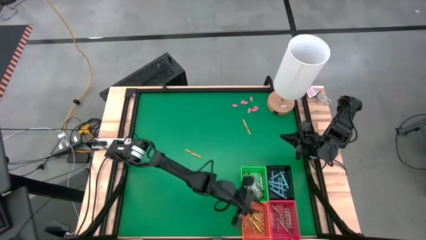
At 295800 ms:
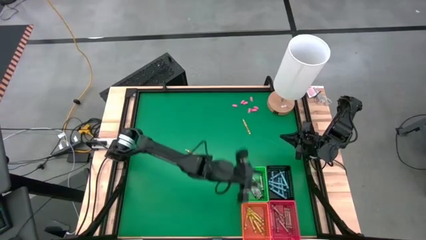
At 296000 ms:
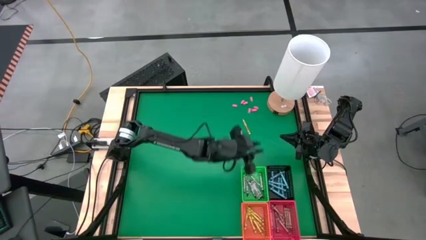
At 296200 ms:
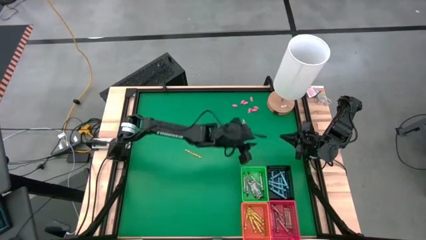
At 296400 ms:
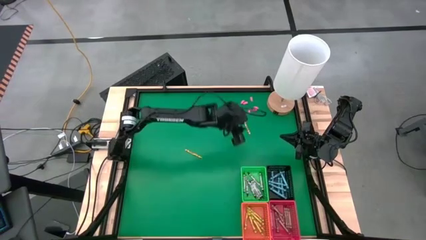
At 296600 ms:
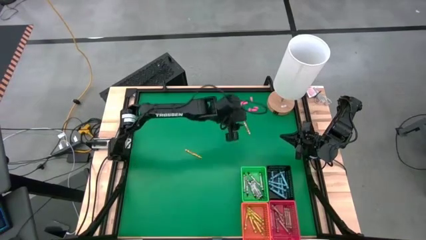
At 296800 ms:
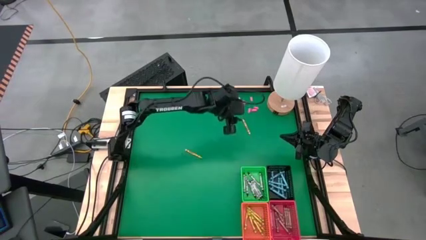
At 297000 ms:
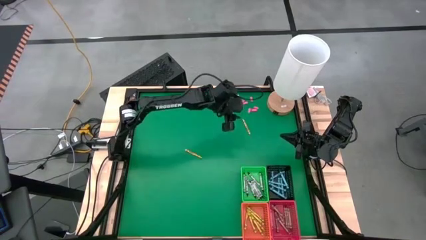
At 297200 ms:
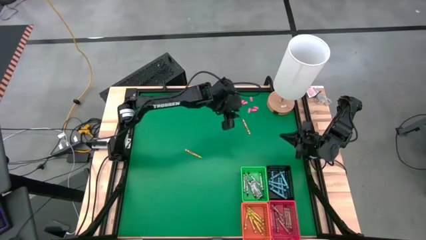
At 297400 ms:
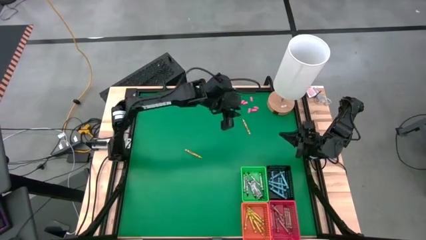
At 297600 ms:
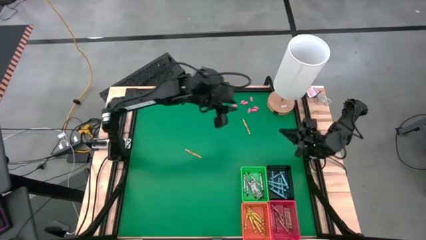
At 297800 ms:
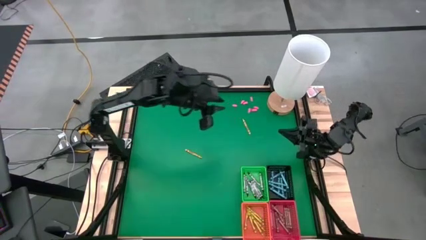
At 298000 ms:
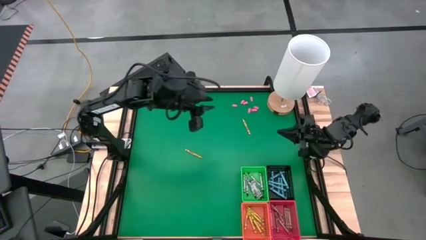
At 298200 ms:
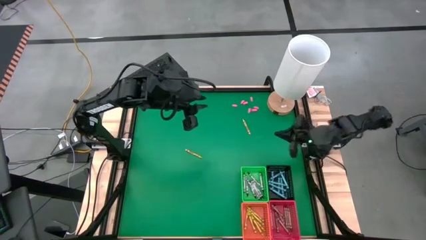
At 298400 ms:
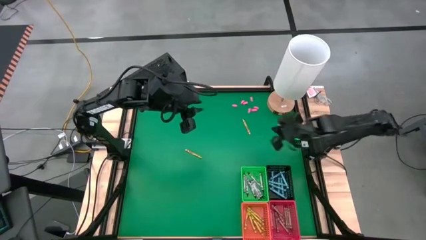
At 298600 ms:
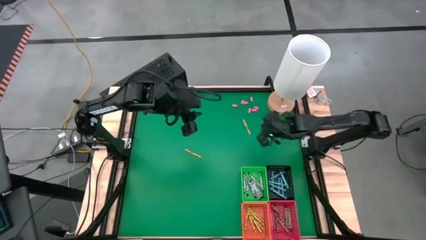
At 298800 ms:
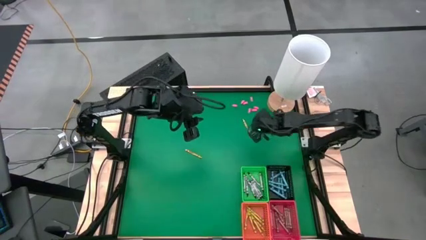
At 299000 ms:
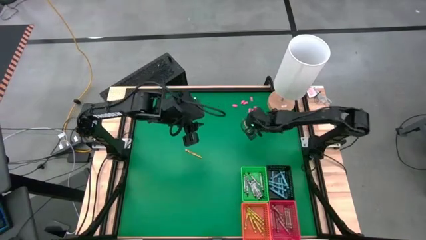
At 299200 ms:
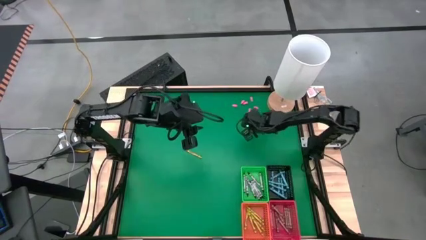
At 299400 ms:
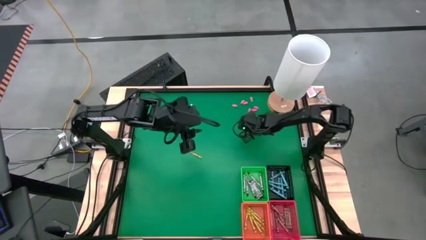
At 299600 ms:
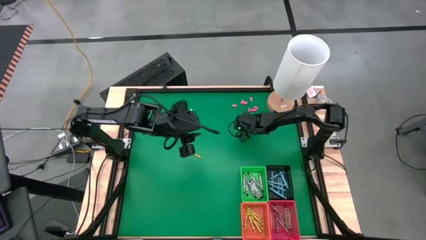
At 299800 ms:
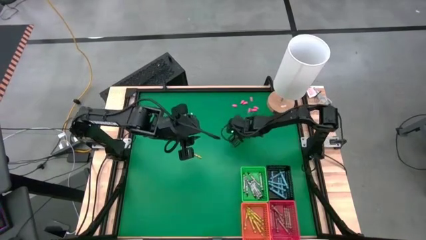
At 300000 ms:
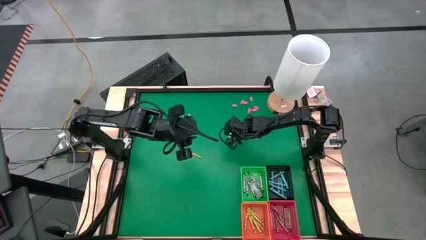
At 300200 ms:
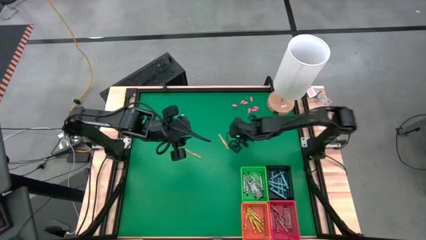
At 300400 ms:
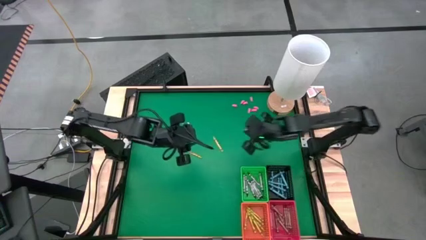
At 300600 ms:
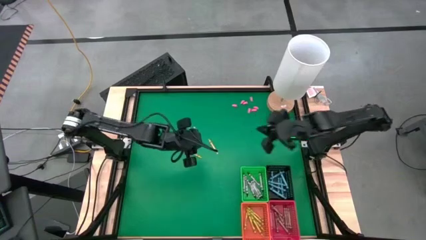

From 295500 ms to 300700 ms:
Task: Sort crayons
Put the light green crayon into the orange bin

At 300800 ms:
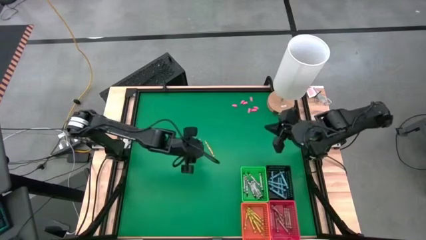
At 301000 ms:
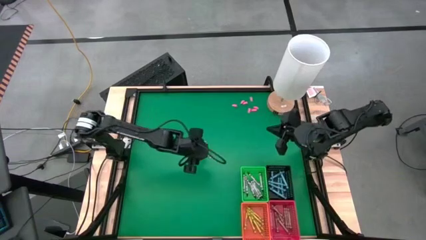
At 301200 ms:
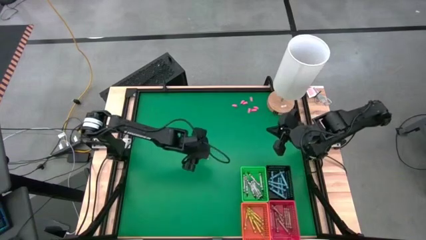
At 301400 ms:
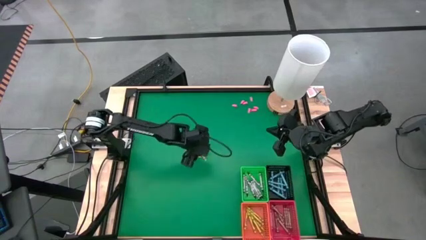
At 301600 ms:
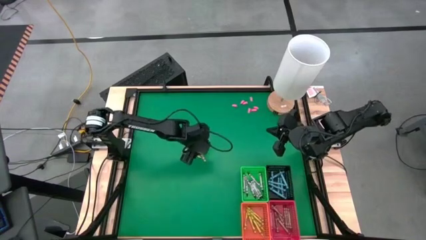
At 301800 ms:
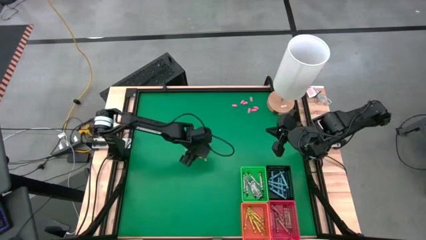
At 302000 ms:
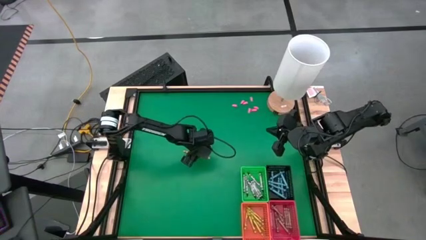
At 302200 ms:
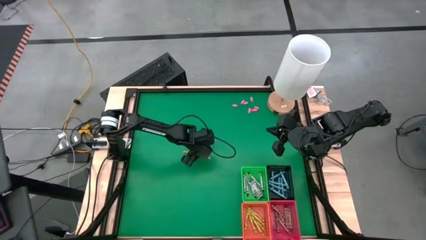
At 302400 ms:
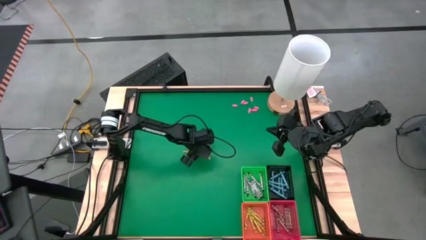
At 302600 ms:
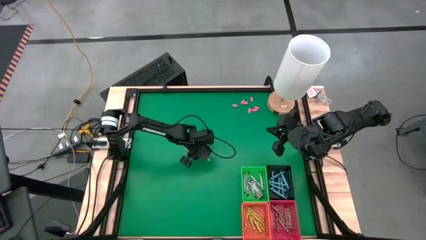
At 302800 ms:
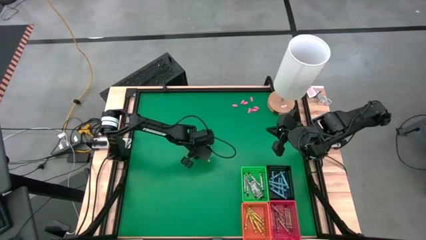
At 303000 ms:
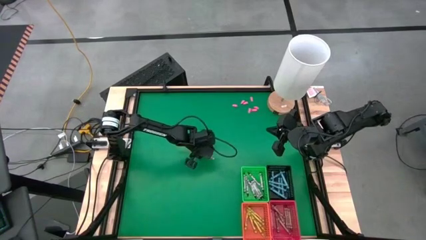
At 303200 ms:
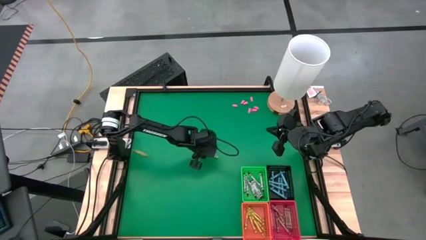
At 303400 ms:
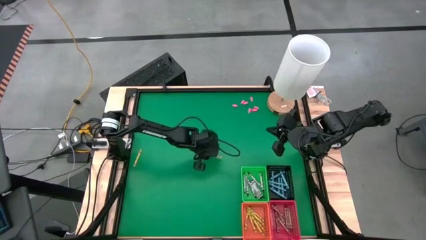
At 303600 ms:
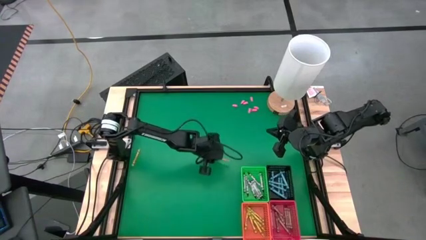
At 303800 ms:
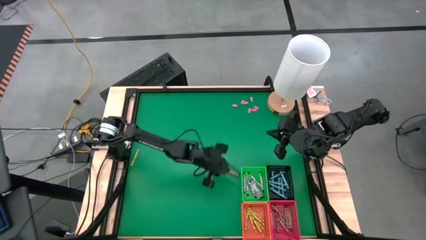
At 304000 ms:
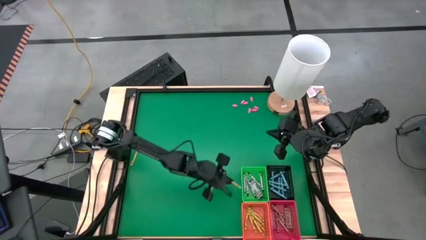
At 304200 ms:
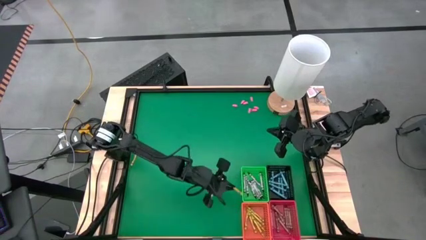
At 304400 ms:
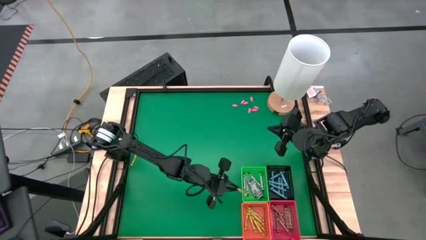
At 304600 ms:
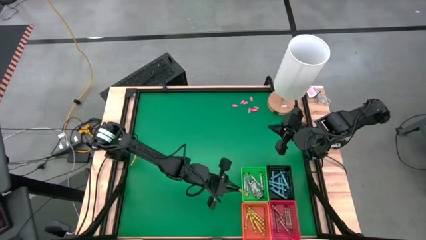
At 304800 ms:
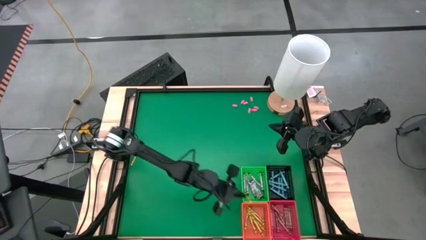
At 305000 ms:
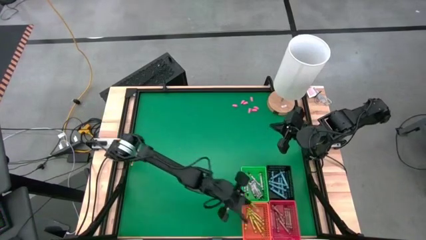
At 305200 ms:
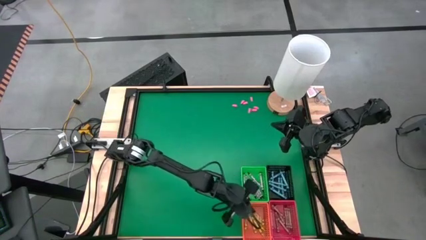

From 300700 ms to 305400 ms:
Put the light green crayon into the orange bin

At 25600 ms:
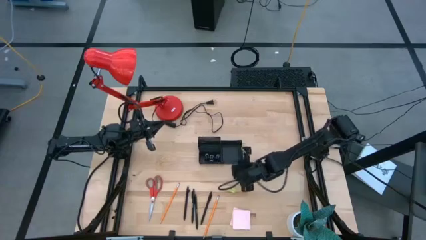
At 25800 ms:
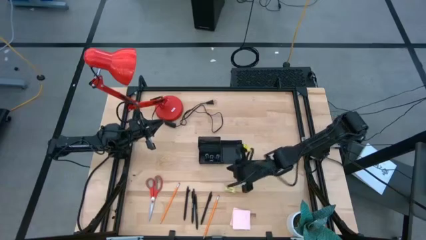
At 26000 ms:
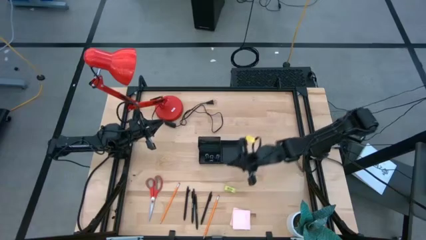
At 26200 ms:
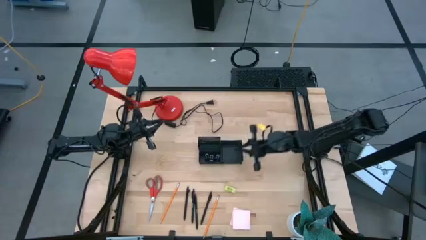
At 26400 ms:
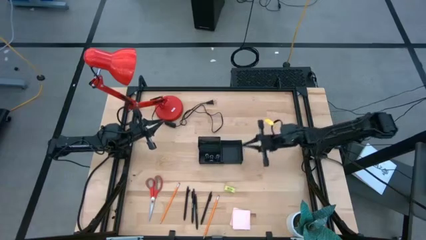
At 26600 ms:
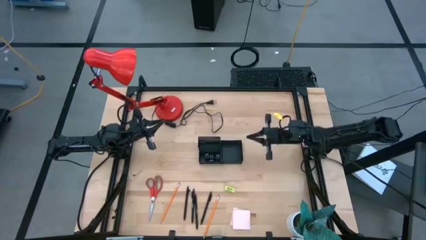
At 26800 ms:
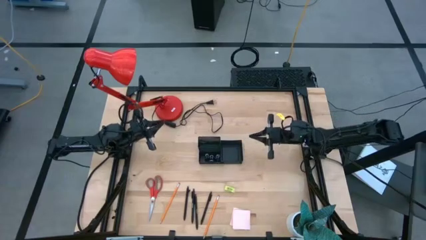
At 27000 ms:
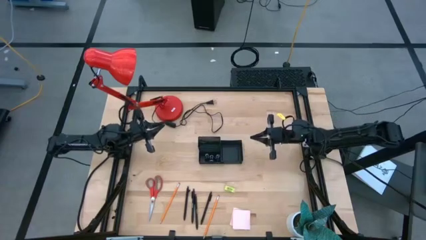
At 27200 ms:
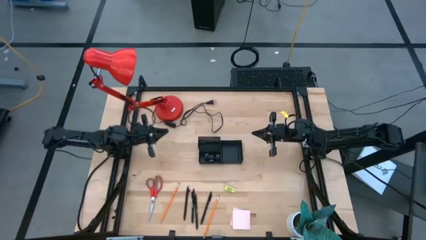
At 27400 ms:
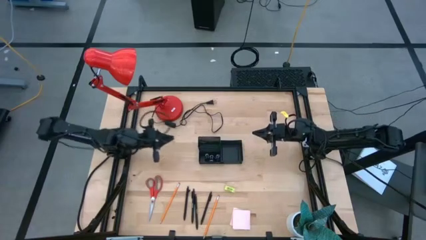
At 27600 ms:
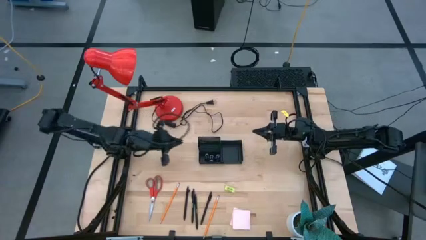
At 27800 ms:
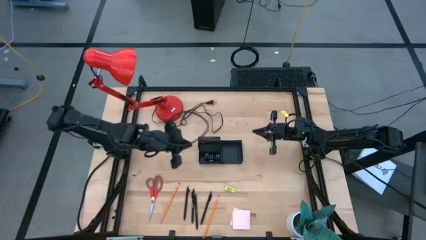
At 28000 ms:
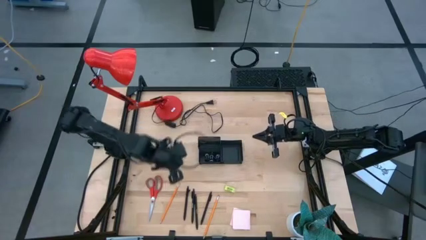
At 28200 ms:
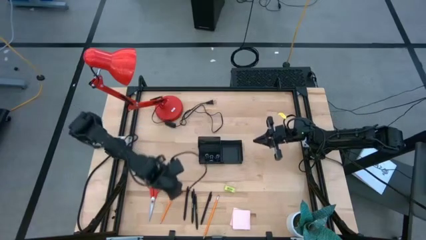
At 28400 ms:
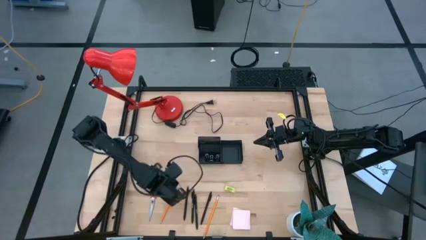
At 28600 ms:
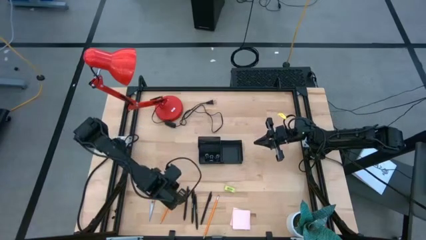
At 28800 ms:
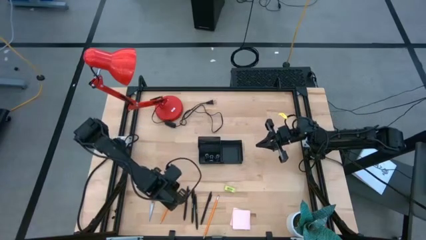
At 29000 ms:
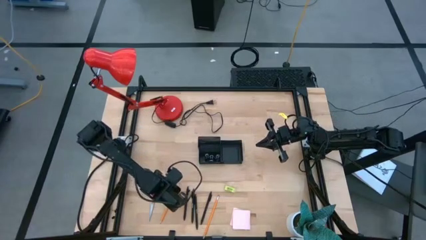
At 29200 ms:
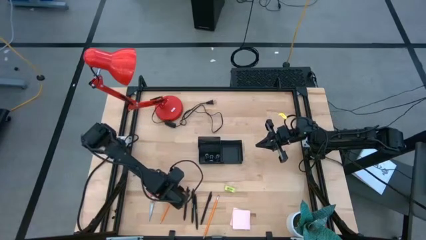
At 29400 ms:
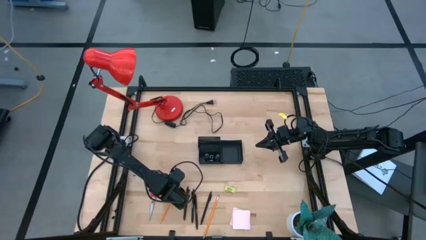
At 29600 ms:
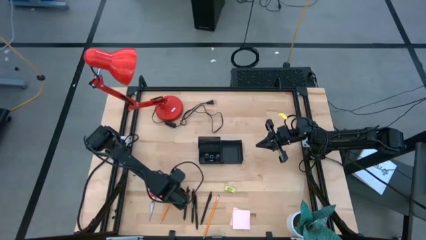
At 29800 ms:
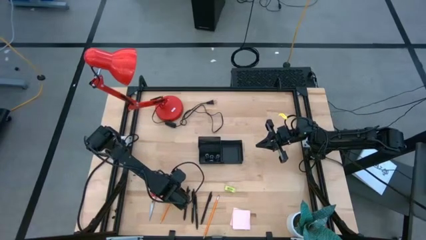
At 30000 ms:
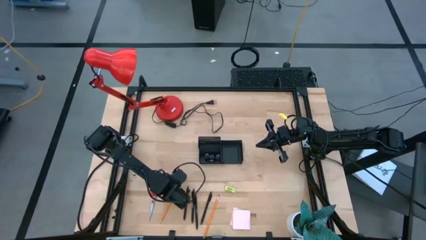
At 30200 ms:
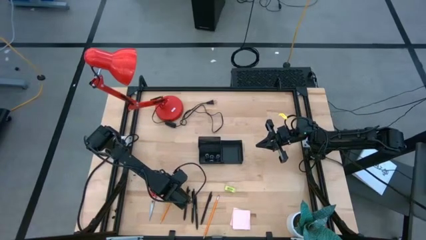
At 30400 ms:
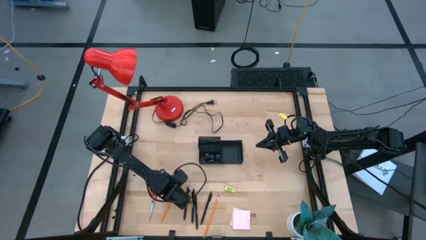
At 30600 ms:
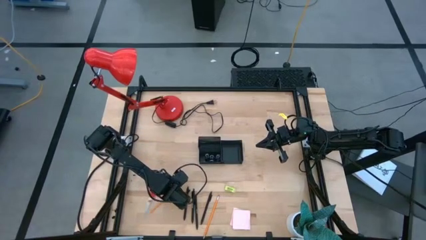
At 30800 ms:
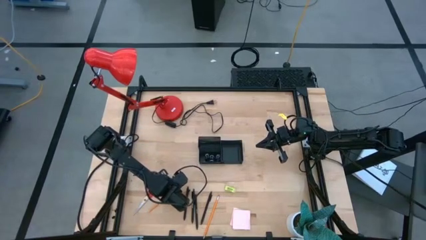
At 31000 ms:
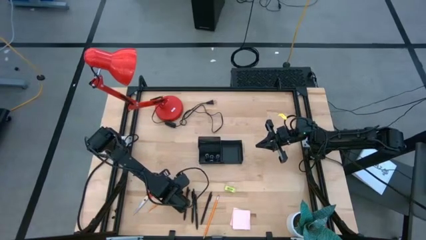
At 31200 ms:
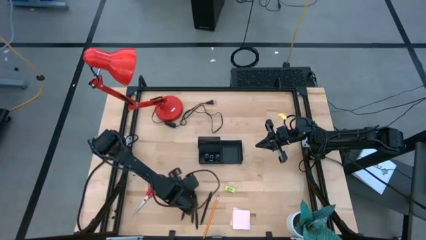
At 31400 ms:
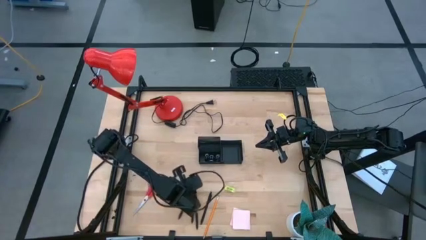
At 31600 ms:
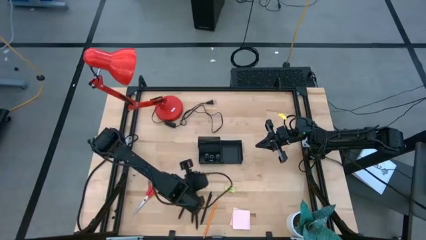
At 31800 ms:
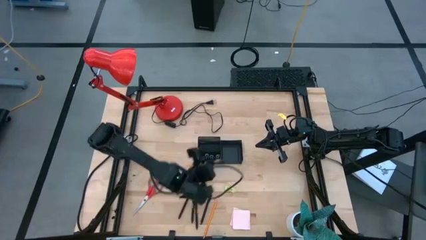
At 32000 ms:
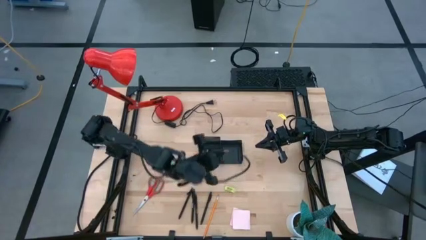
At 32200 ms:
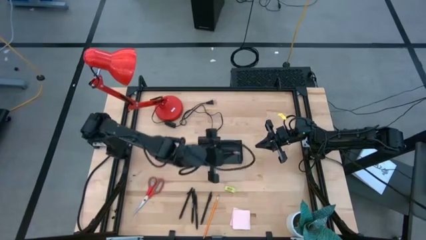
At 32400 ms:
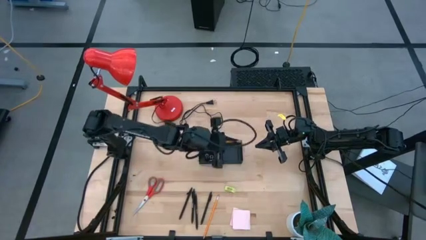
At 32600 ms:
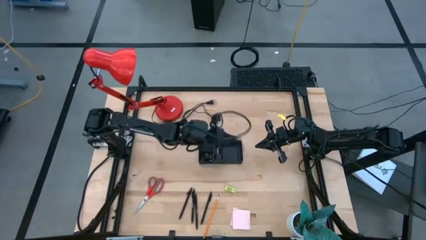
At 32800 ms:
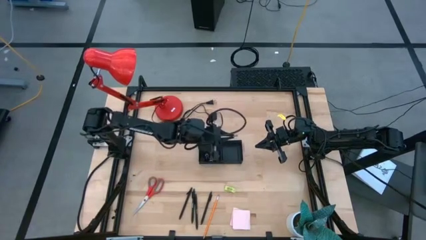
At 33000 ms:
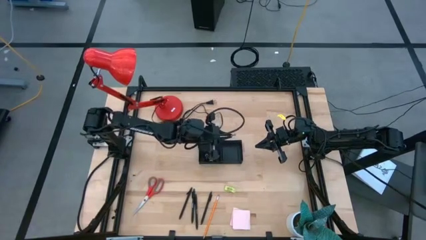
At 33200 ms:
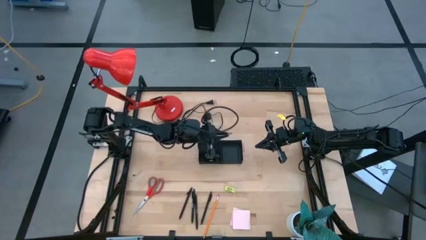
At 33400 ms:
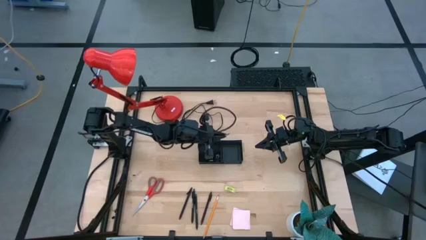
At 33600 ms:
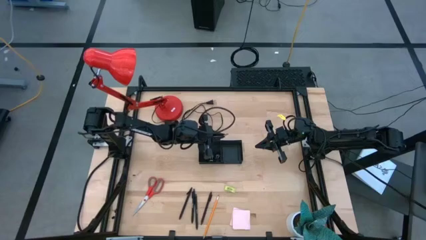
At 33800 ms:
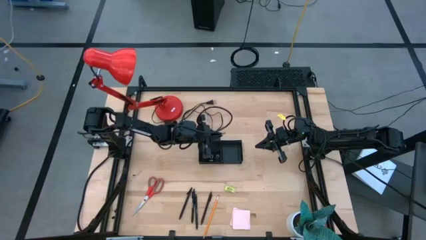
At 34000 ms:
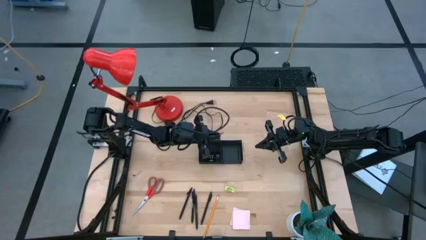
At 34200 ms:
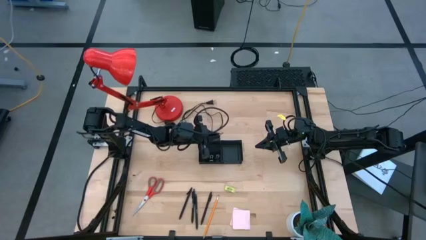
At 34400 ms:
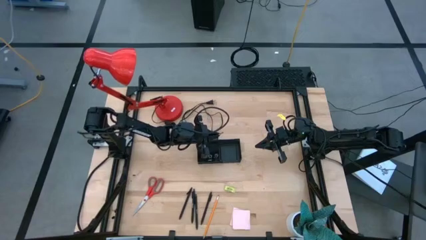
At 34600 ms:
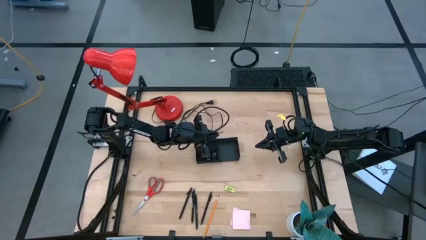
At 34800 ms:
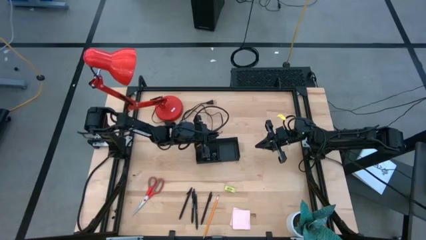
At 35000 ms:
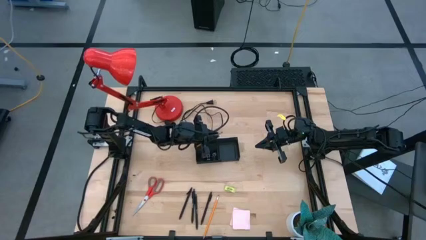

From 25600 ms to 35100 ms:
Task: Pick and place office supplies into organizer
Put the orange pencil into the desk organizer
